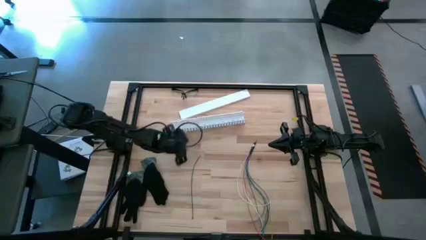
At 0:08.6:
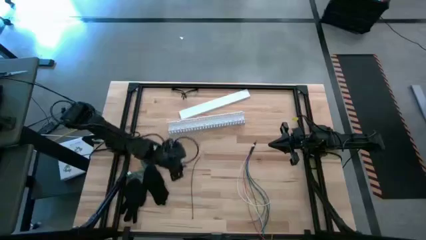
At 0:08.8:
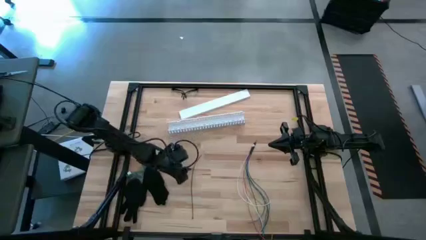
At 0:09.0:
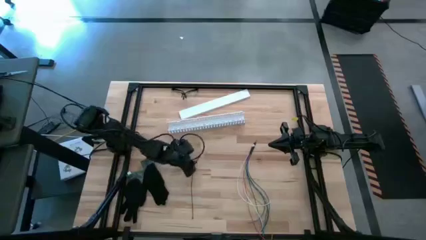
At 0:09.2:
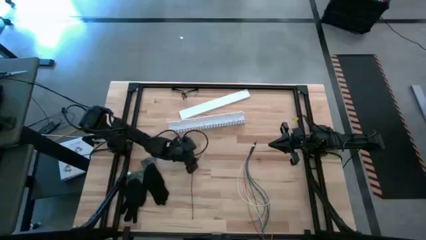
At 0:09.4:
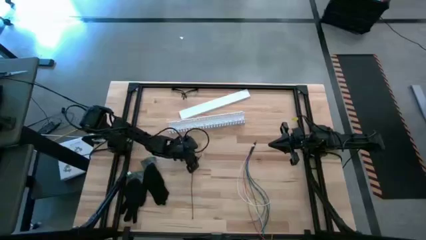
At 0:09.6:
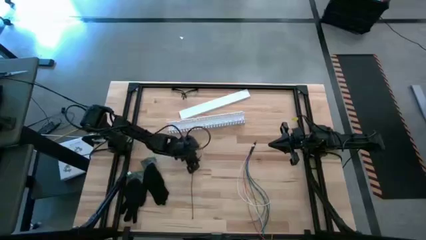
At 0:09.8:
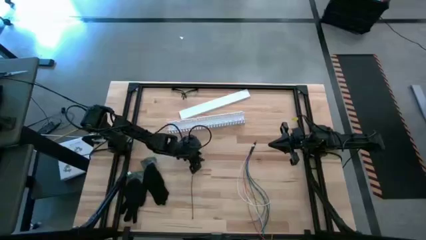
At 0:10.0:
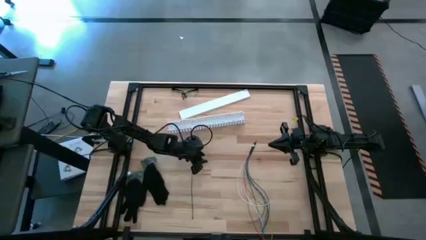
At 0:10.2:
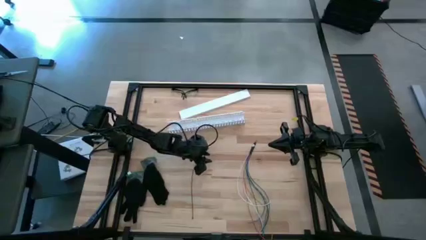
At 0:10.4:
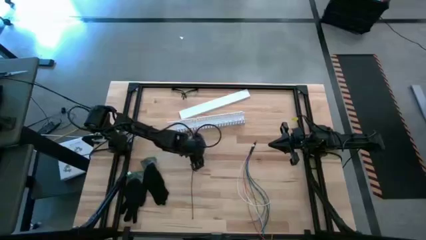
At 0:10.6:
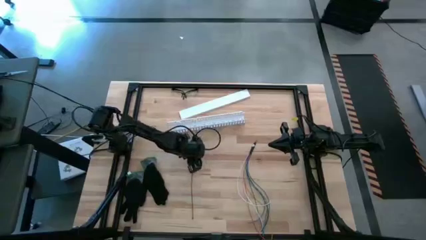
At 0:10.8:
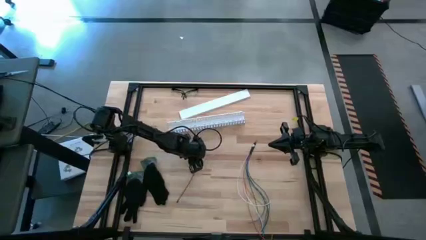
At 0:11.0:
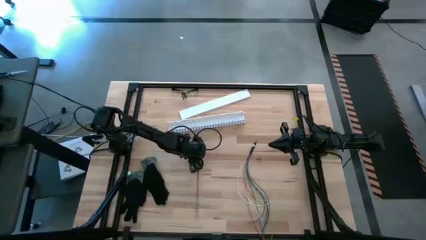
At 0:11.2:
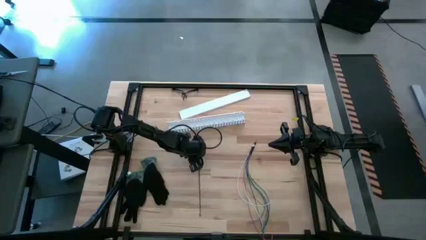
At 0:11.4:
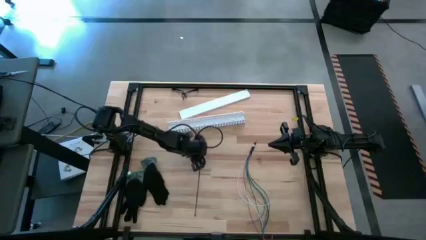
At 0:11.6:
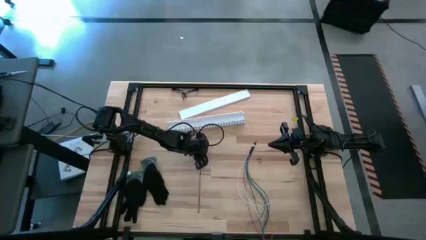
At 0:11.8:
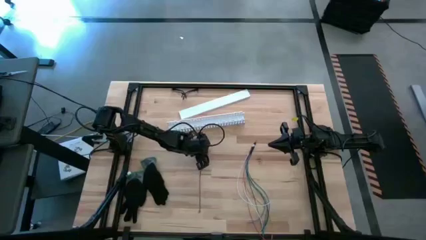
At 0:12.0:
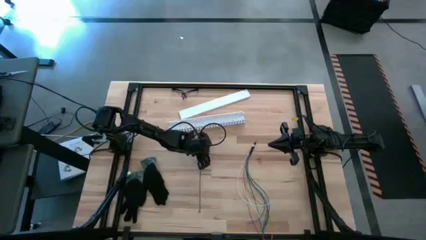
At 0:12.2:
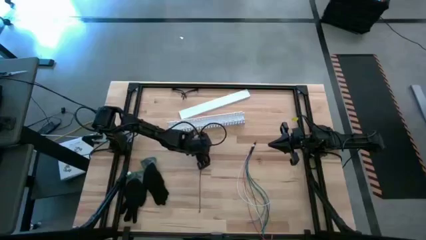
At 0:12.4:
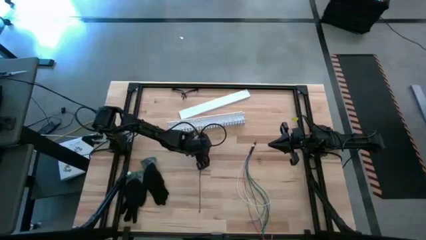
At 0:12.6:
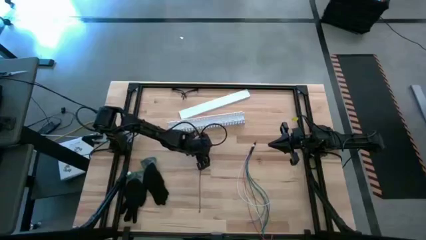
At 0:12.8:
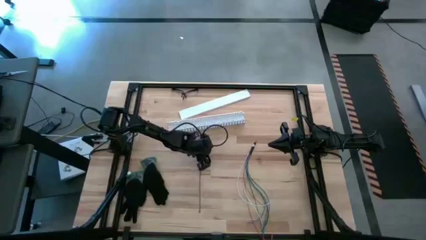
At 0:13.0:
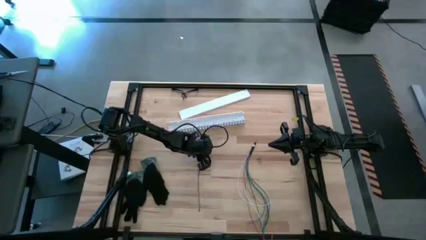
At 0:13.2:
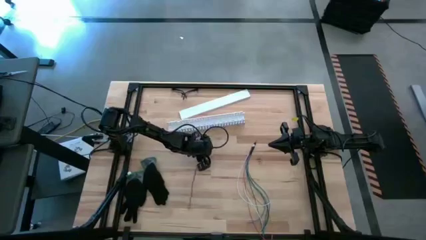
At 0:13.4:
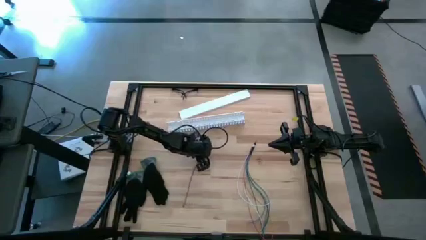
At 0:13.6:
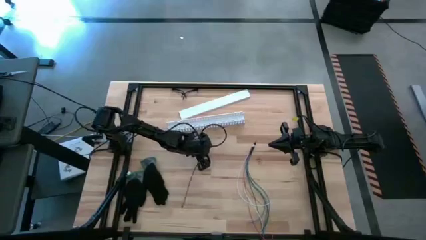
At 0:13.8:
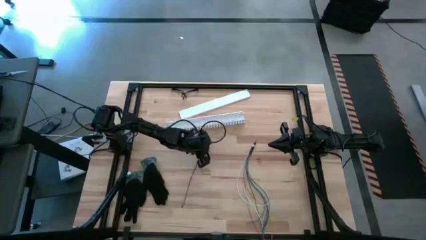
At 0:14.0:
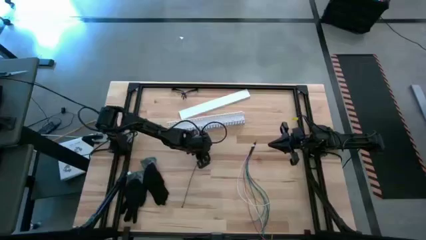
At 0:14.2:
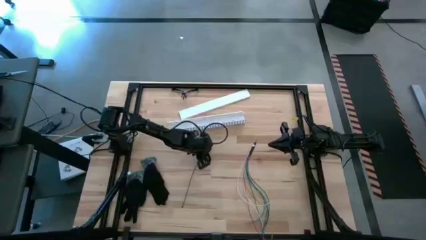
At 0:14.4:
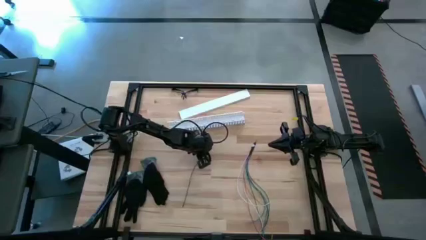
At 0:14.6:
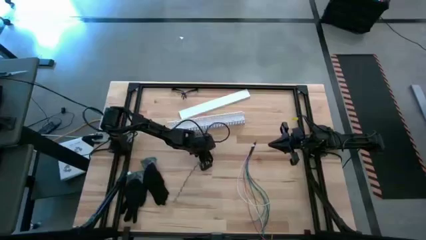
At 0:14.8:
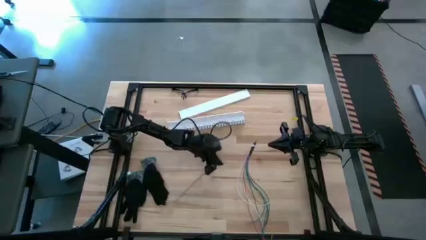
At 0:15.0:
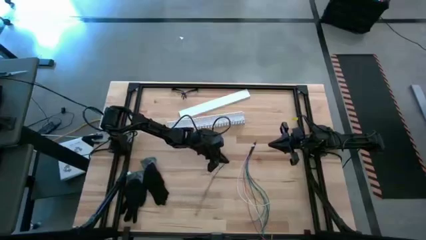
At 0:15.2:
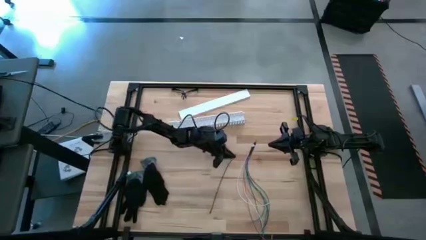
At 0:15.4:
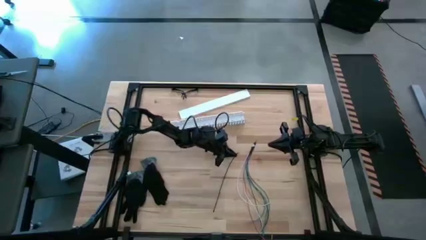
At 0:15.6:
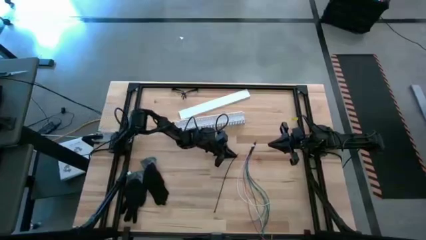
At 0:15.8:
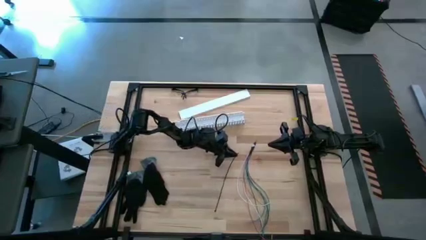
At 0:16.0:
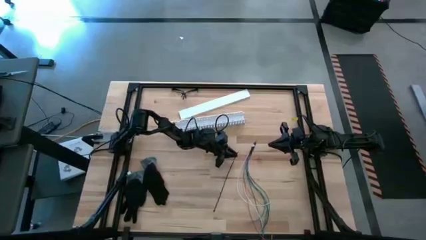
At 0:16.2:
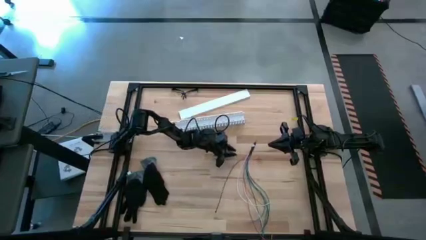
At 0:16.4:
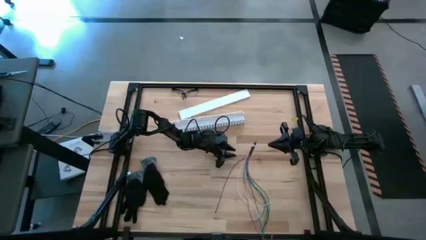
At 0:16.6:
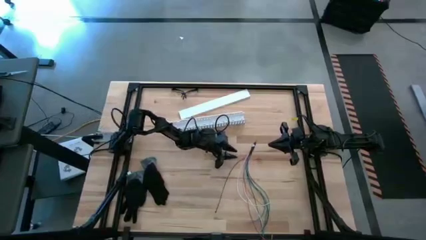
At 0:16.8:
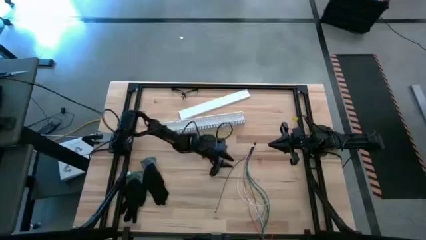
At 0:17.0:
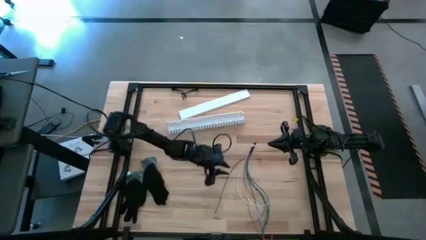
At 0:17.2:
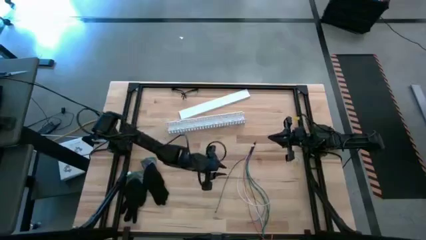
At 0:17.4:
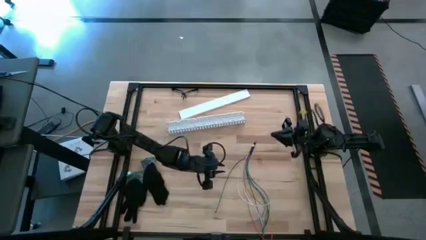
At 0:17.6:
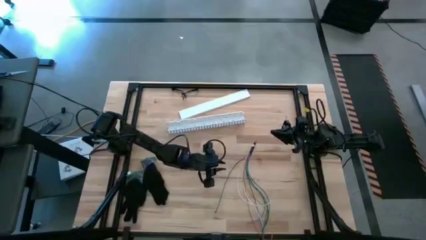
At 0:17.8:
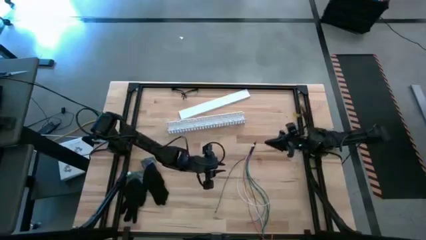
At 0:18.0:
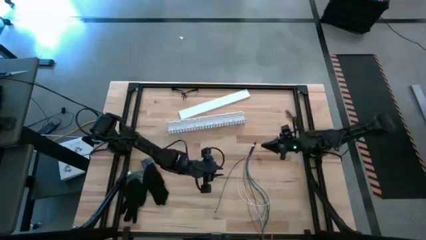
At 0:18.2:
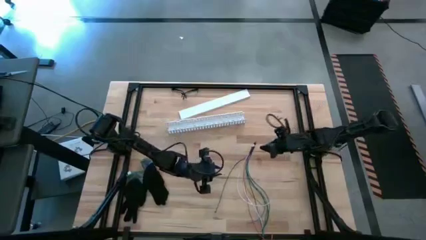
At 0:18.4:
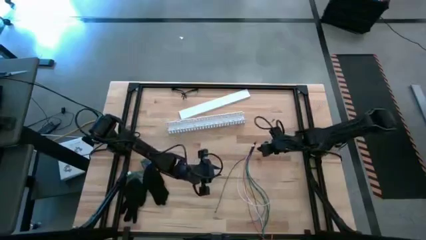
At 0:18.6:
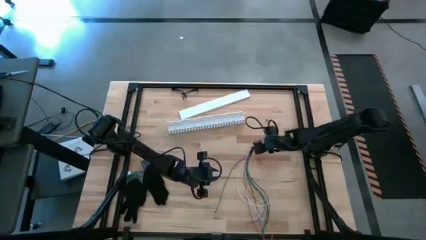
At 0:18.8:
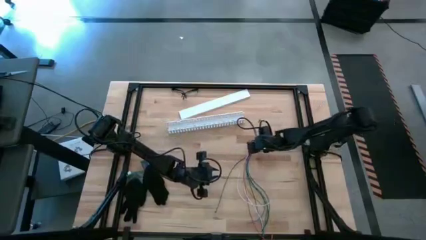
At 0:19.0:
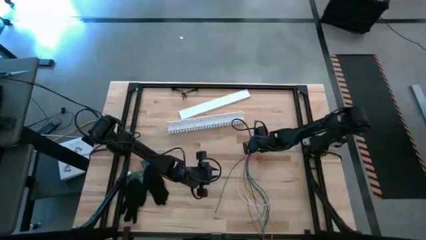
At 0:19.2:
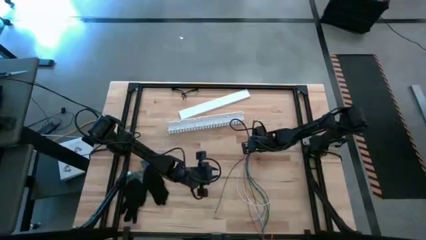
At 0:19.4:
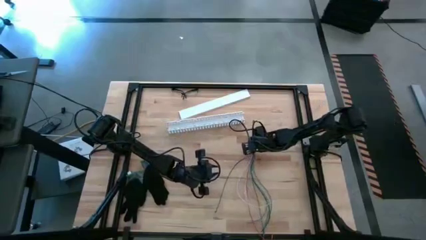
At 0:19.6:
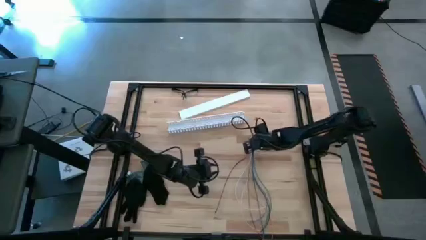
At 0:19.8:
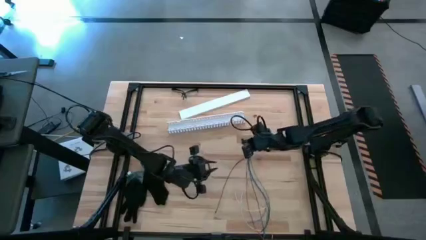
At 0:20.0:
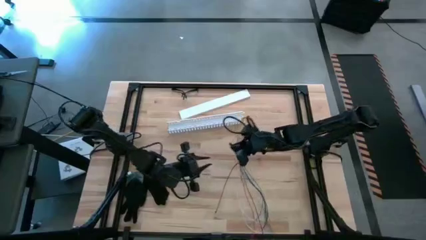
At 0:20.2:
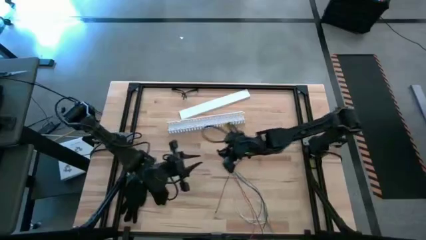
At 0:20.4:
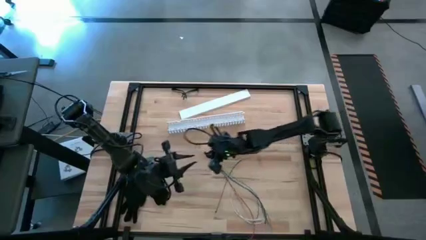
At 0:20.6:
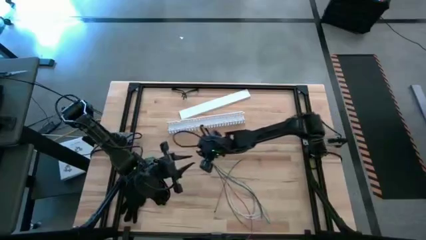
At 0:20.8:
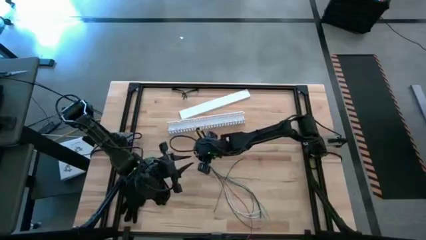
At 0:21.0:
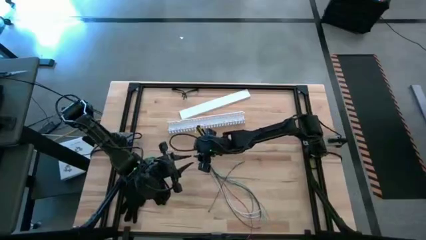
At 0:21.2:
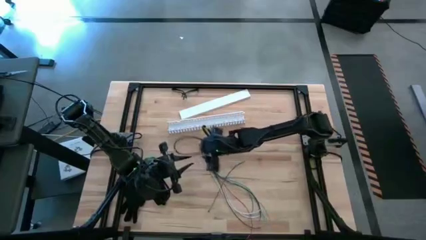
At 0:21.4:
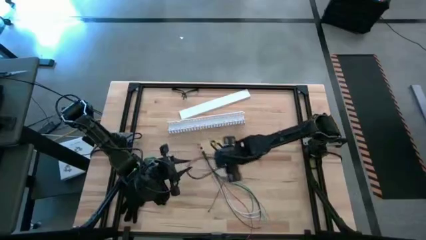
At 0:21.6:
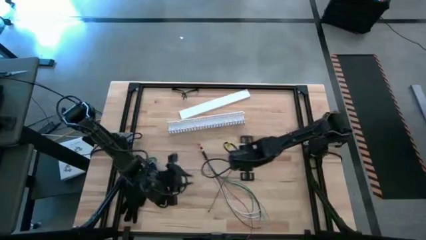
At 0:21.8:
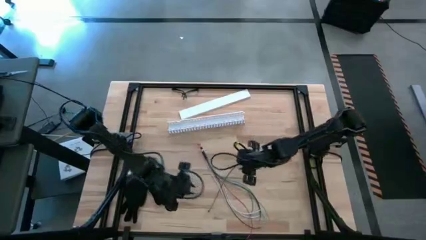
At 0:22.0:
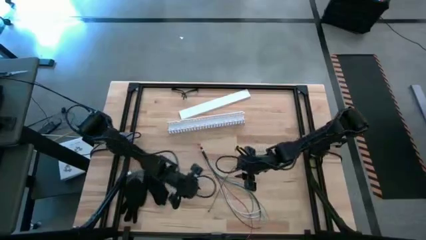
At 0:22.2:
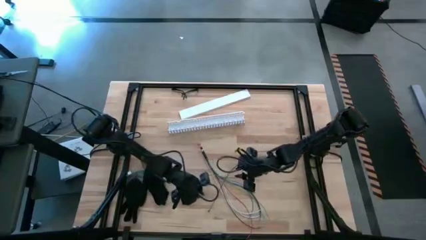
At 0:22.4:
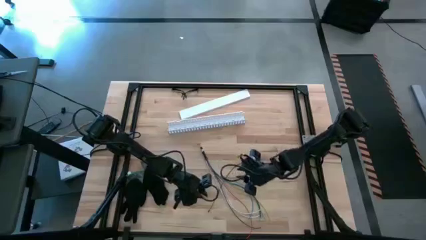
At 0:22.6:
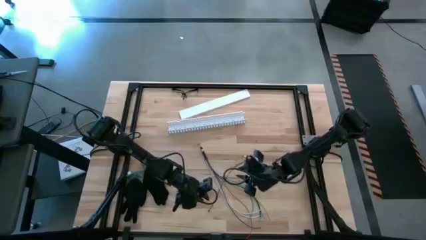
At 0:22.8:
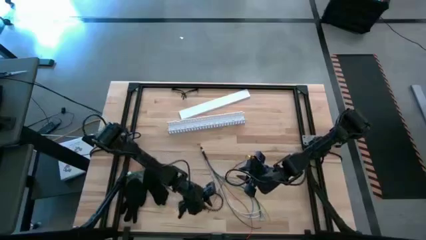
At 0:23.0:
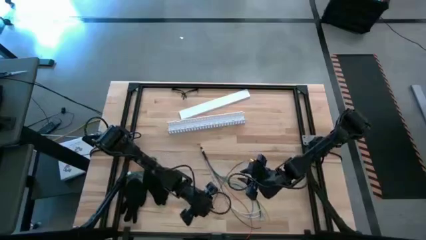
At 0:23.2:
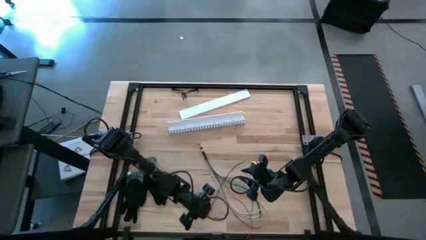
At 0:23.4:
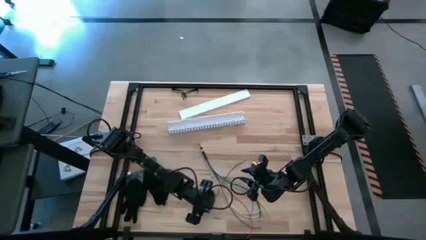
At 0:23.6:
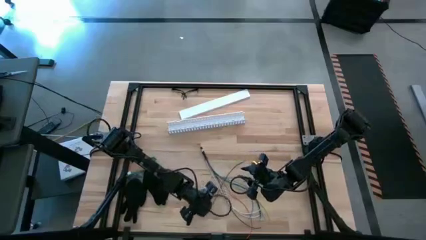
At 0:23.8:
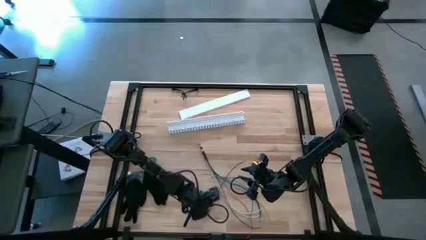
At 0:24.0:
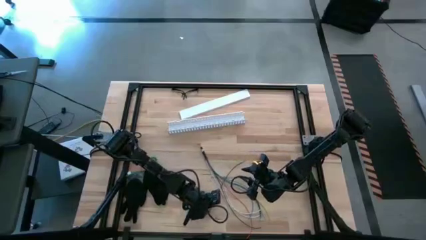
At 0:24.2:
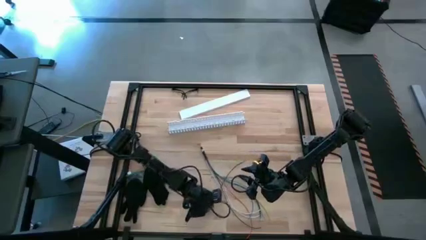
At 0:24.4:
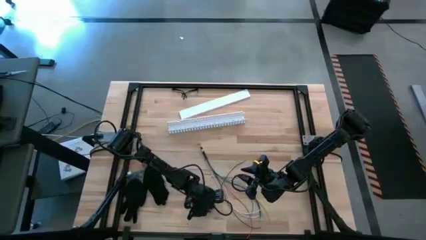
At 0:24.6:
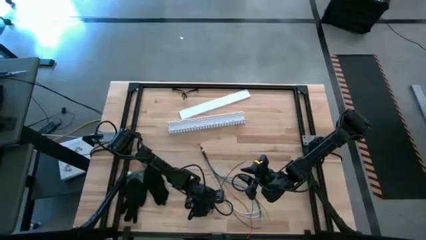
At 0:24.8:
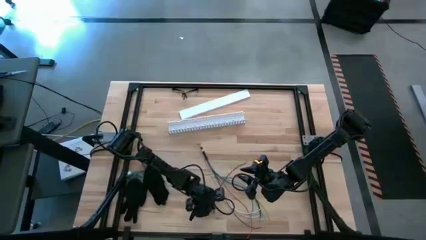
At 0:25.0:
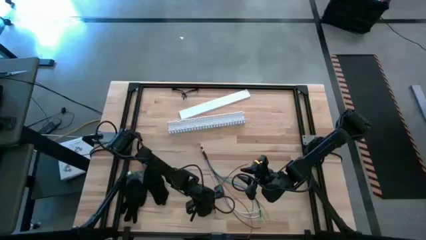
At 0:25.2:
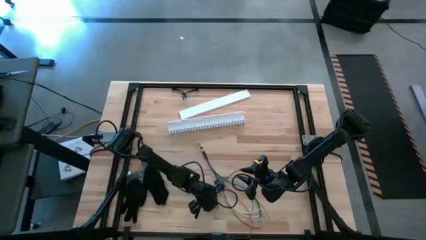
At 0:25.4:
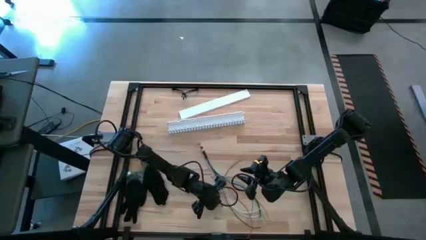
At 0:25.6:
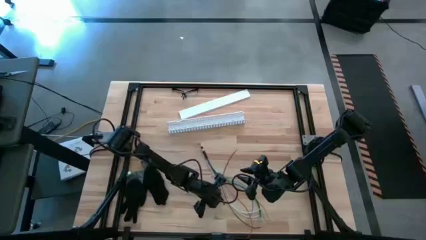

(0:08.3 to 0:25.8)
Task: Ziptie cables
Wrap the black zip tie on the cable
